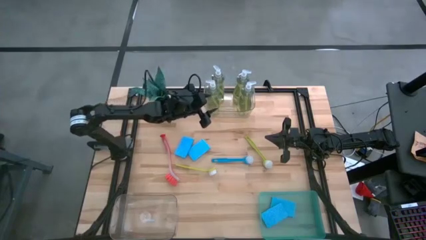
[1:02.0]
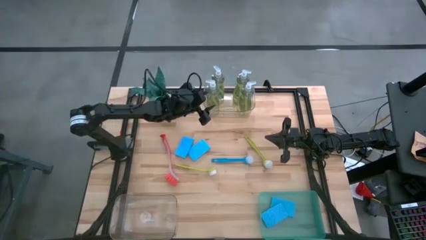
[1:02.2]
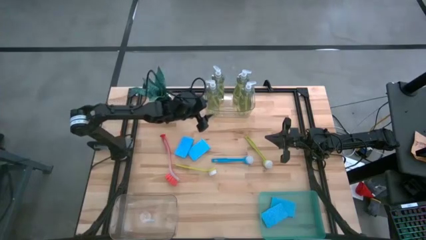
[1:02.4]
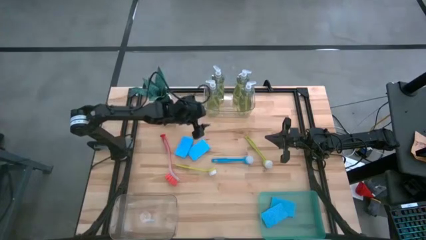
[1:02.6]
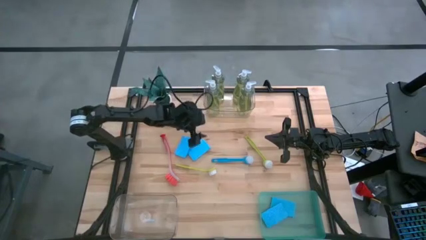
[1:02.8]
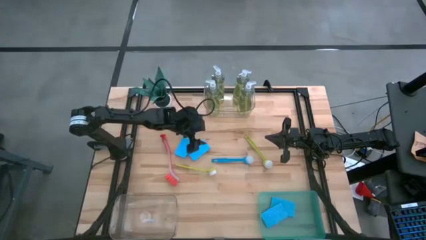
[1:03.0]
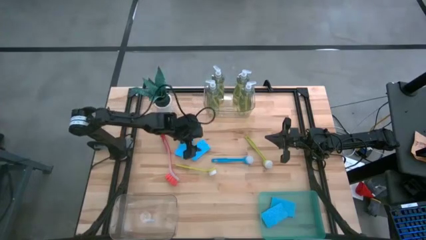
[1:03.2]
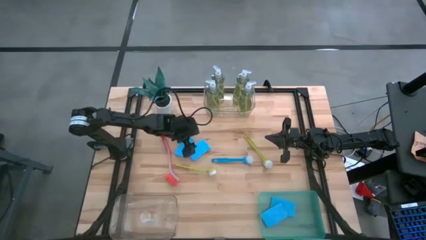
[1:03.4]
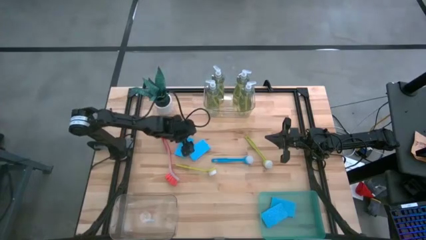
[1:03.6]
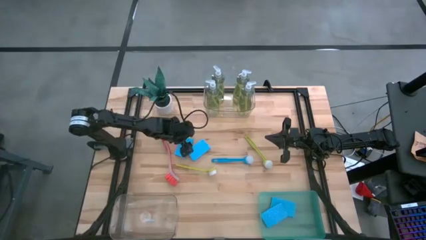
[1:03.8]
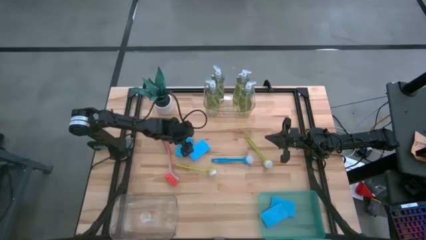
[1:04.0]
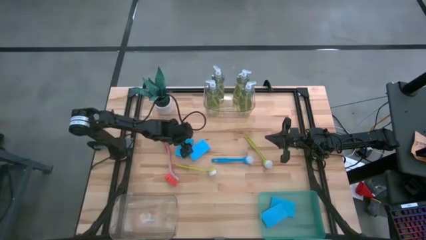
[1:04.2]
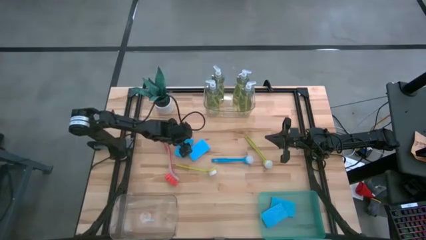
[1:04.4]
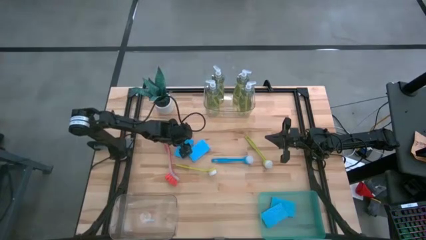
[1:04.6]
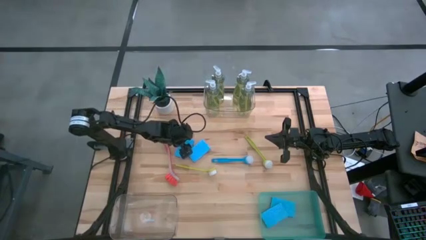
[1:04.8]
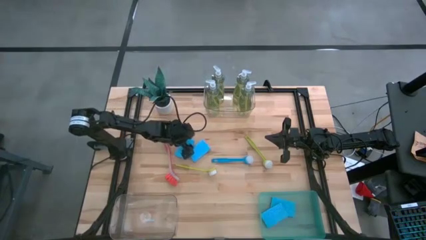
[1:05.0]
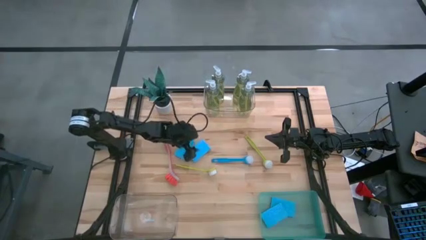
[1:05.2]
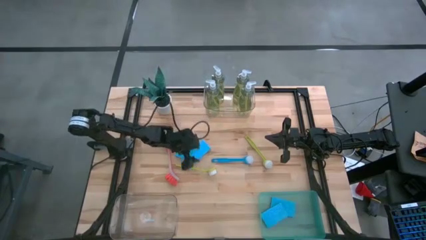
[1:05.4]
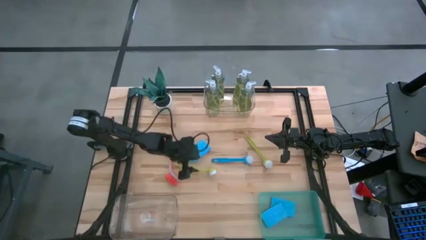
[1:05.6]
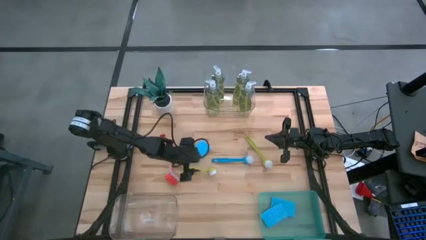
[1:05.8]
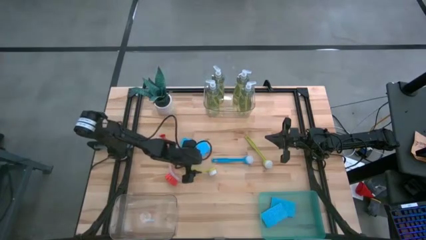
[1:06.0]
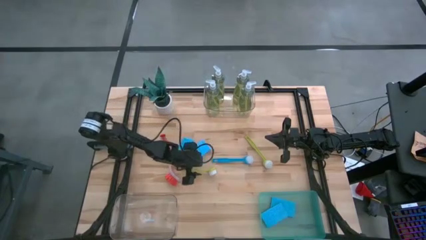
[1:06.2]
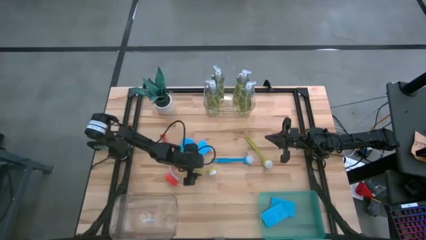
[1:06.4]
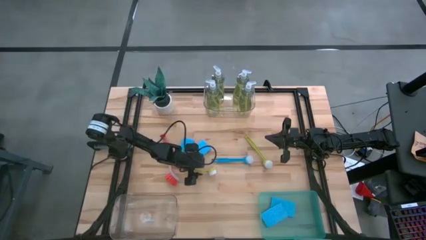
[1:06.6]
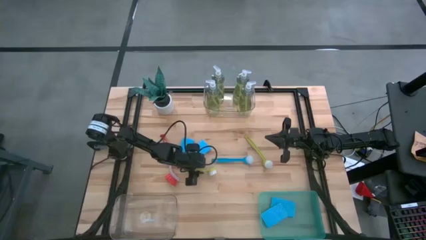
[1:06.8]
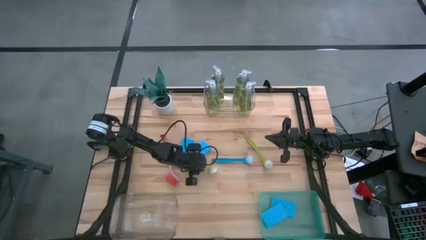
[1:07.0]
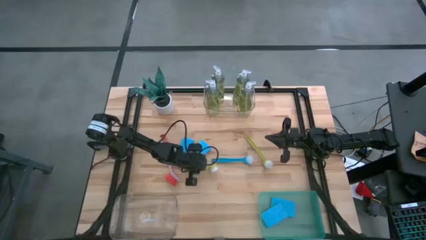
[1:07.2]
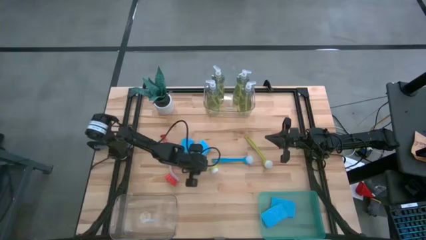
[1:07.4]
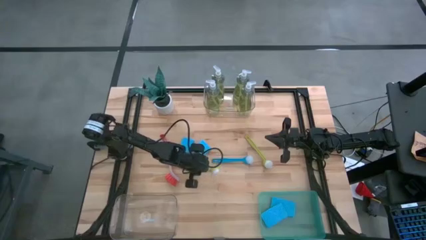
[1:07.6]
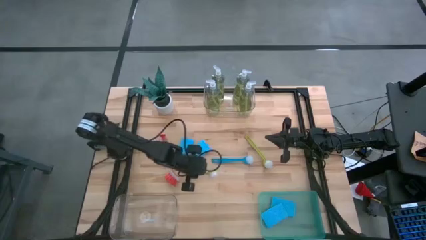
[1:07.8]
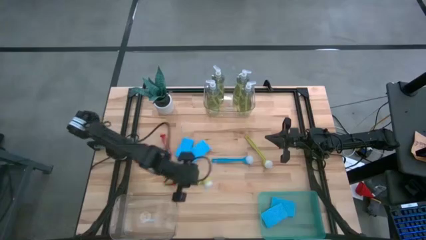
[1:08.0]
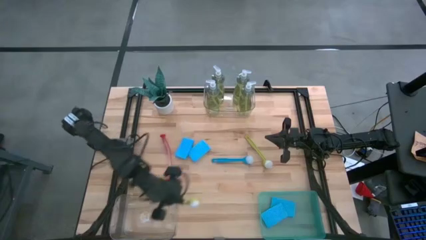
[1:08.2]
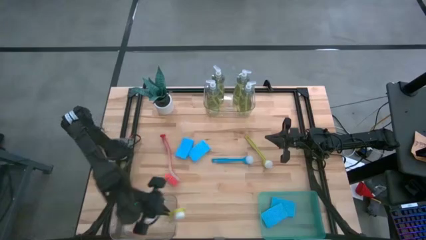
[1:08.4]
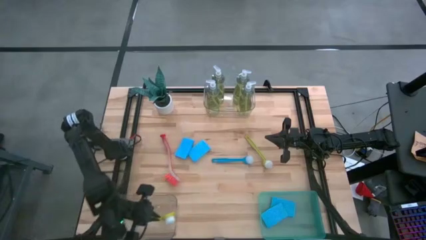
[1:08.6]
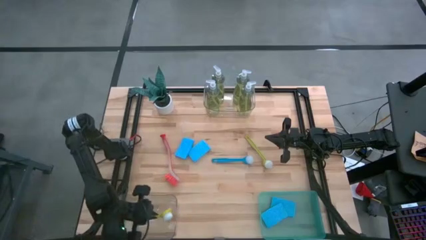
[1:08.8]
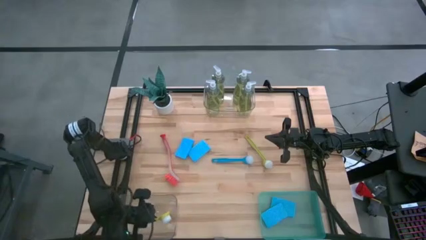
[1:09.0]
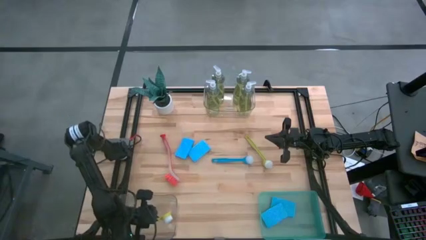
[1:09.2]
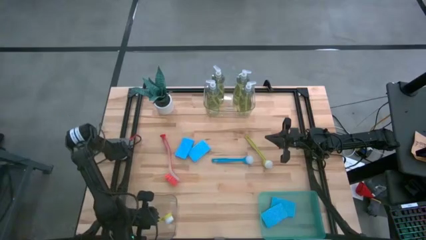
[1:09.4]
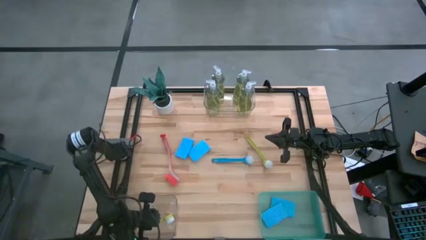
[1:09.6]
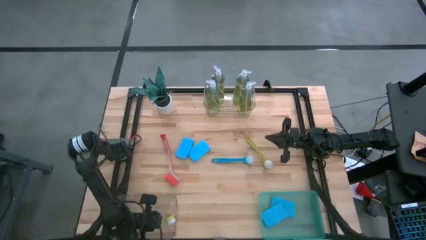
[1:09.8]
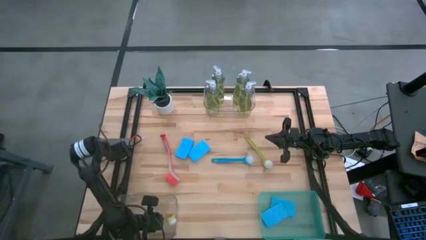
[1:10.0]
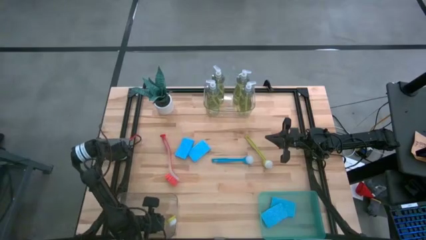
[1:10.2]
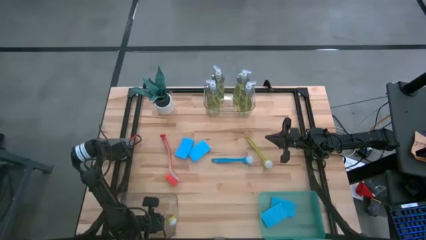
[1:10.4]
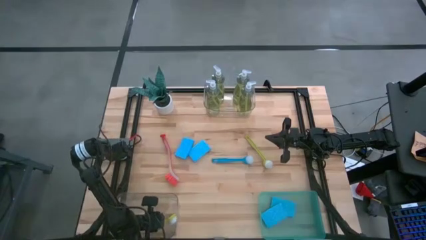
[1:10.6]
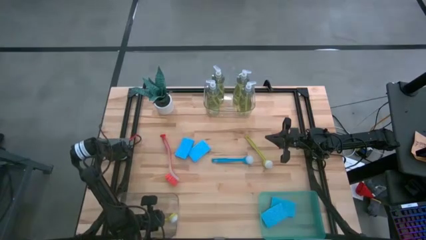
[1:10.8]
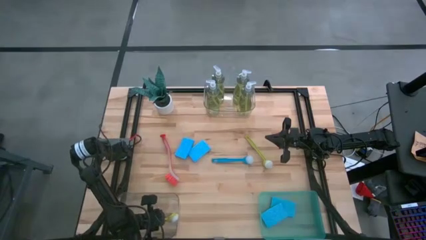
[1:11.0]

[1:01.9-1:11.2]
Task: Pick & Place Kitchen Sink Supplies
Put the green dish brush into the bottom transparent bin

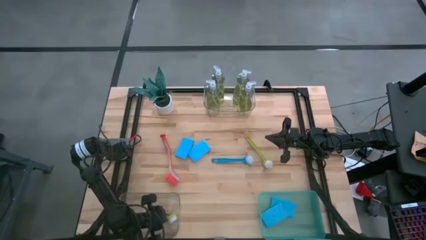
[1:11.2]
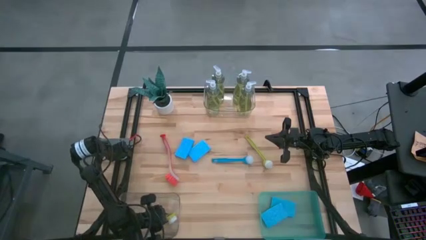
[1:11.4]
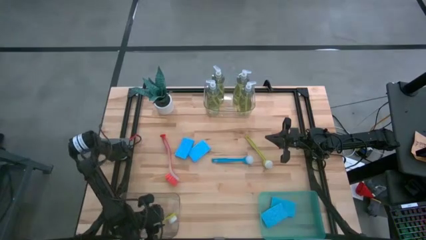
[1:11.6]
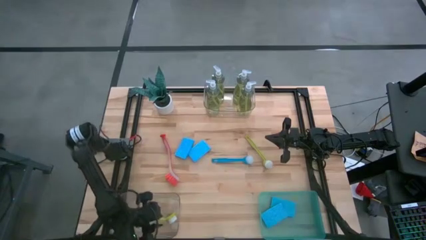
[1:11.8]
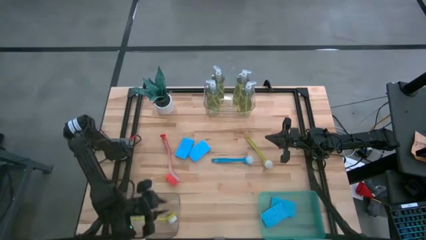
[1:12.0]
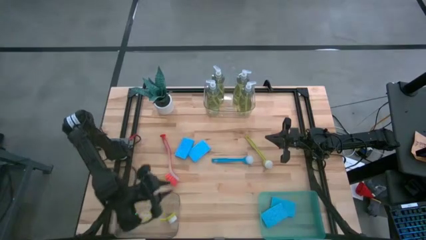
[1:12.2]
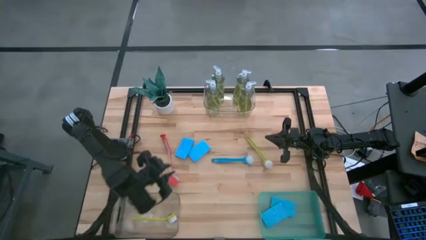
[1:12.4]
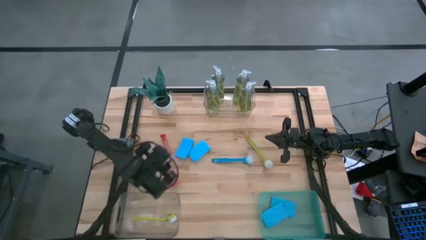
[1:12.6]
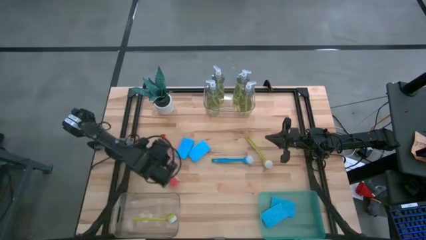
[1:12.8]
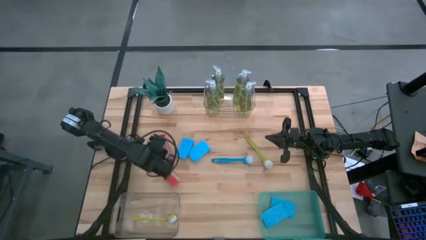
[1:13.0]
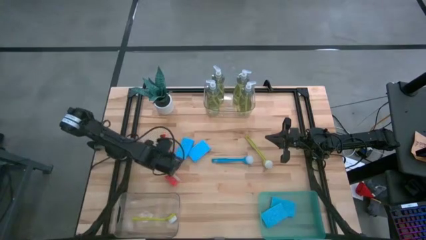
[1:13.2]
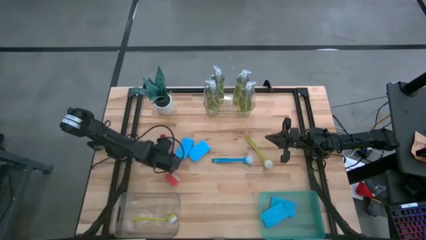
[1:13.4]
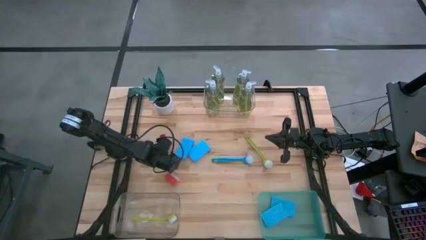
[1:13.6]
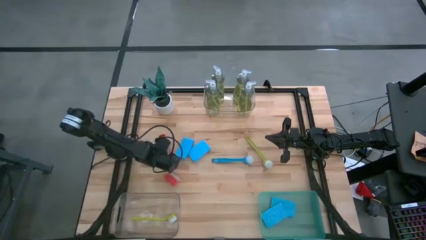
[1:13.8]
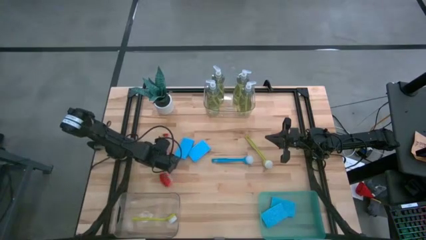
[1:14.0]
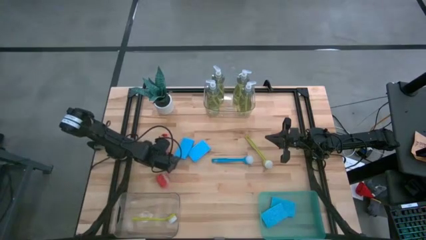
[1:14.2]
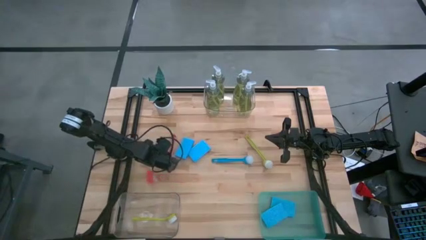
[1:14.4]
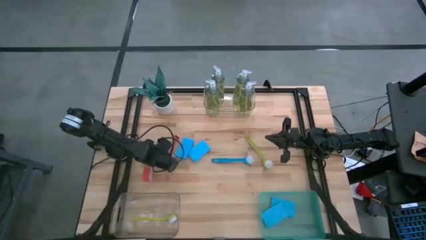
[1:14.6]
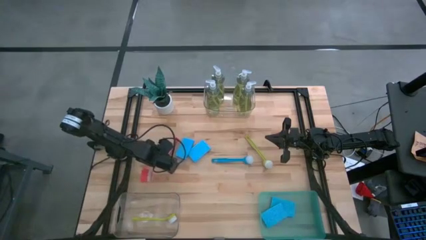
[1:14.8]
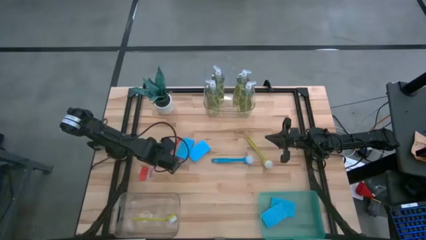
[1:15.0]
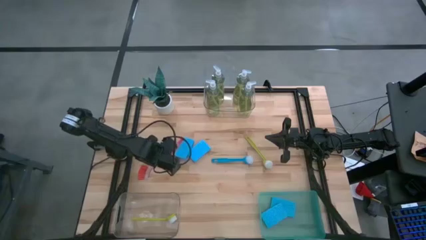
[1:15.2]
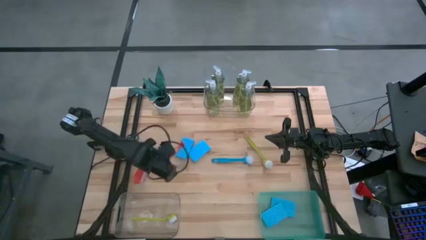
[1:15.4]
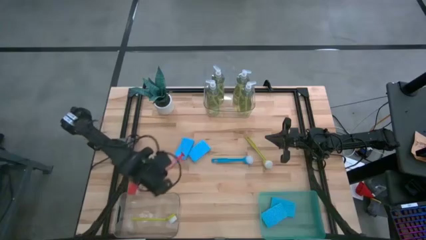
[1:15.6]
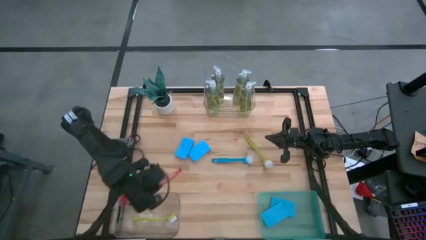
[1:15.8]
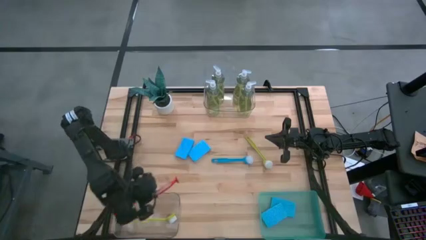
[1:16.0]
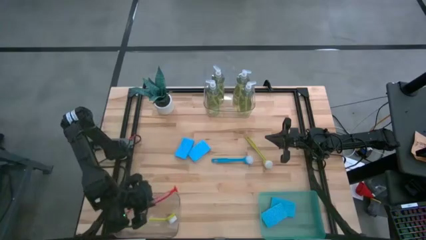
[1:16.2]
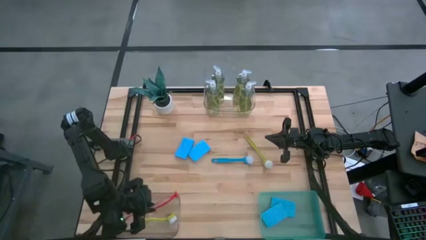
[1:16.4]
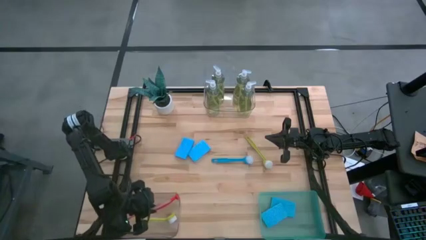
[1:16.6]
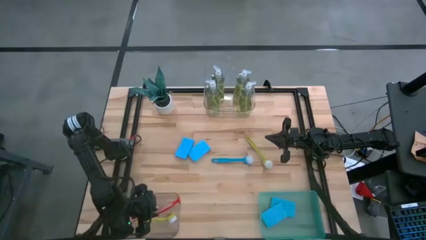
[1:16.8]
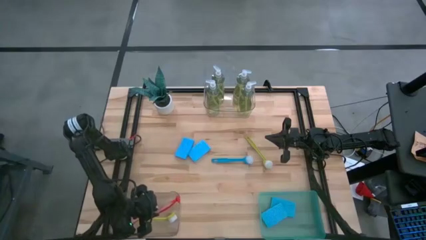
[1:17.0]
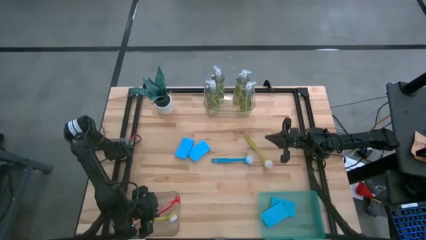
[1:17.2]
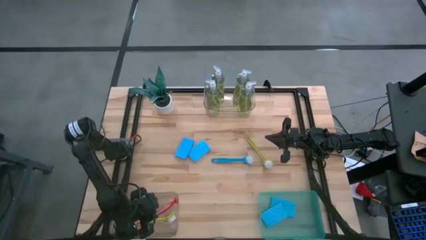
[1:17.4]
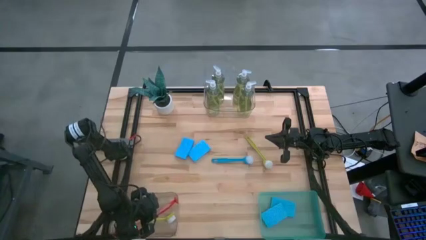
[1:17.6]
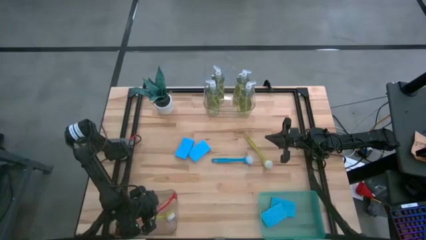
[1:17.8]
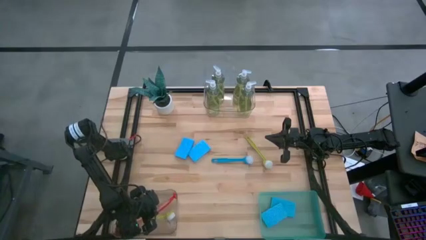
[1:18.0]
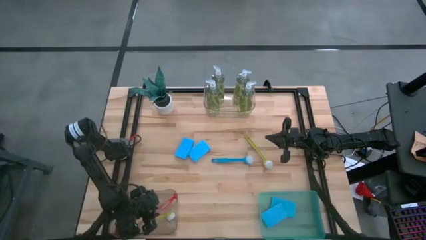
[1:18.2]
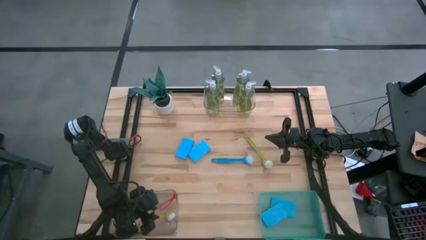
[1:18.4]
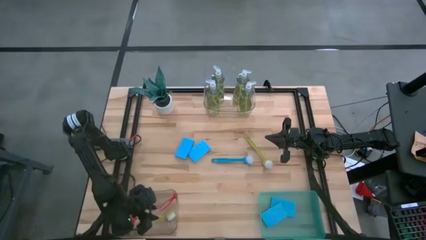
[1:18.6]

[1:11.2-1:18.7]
Put the orange dish brush into the bottom transparent bin

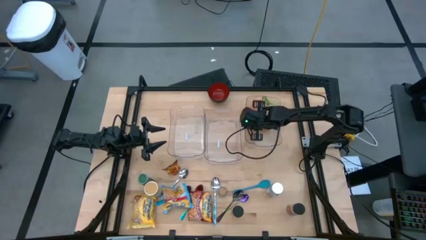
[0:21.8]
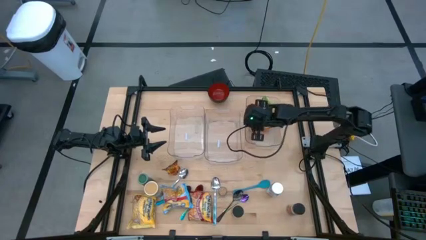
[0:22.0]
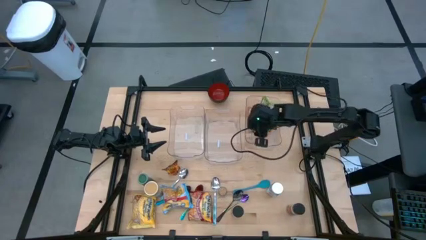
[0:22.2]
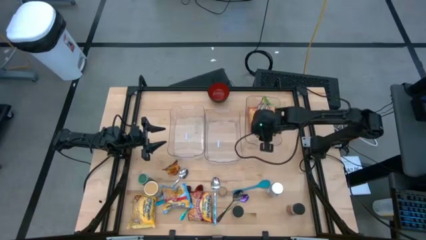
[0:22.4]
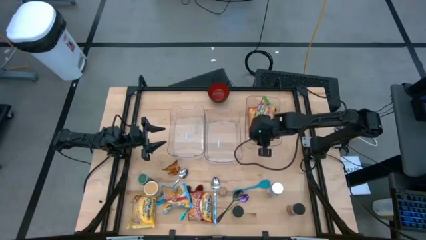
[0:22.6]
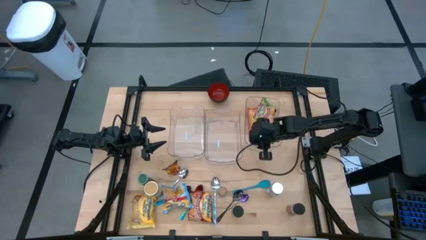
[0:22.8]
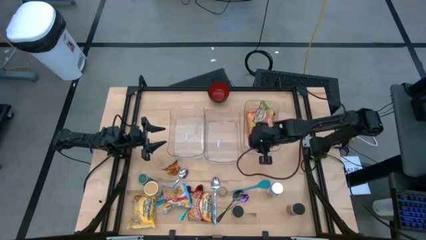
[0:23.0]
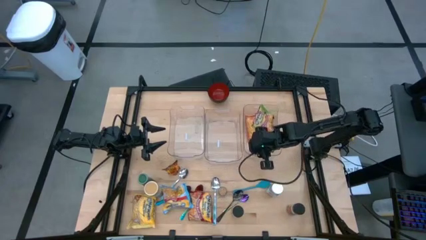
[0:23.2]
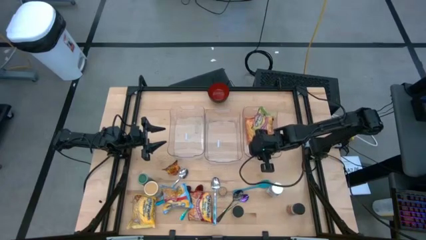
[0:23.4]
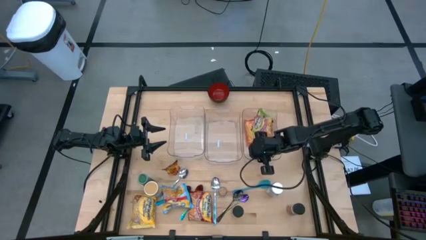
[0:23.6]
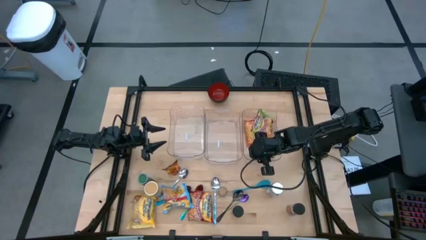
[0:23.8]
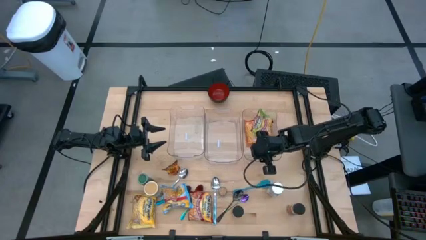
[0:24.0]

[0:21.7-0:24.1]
Task: Pick & Place Food Item
Adjust the right transparent bin
